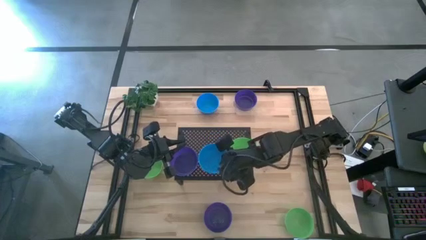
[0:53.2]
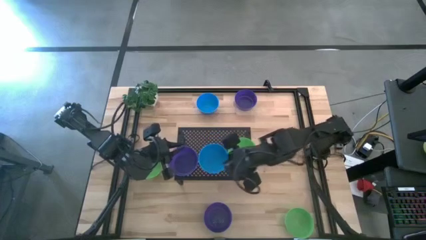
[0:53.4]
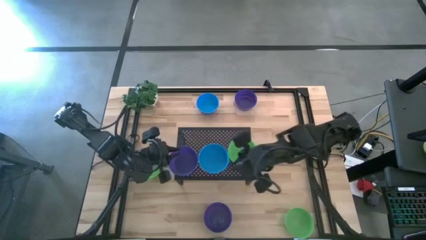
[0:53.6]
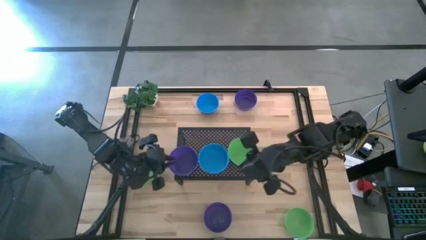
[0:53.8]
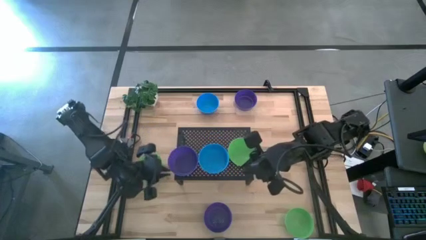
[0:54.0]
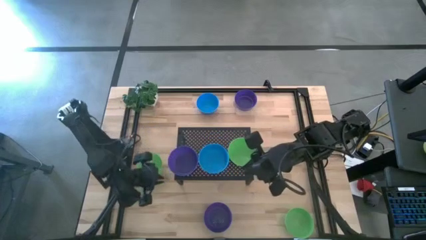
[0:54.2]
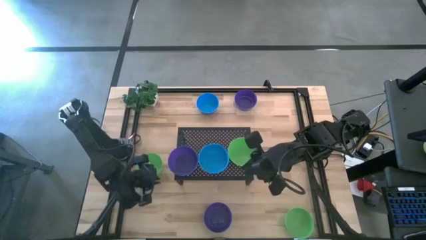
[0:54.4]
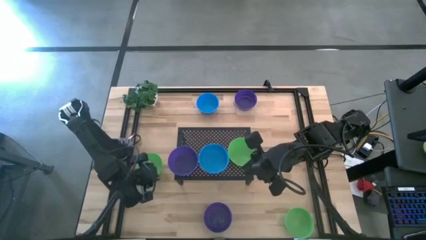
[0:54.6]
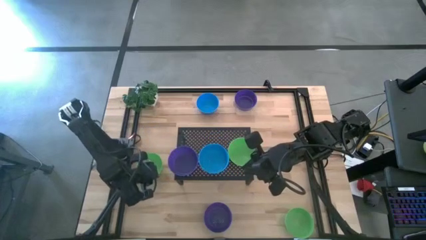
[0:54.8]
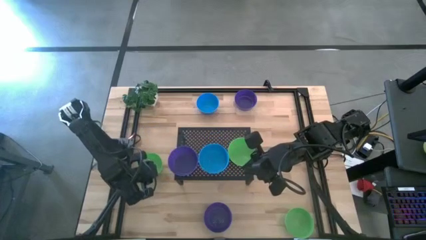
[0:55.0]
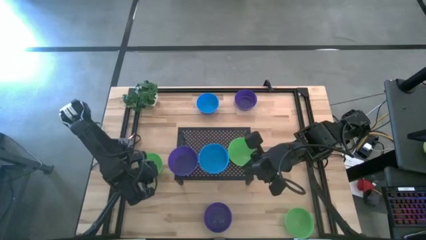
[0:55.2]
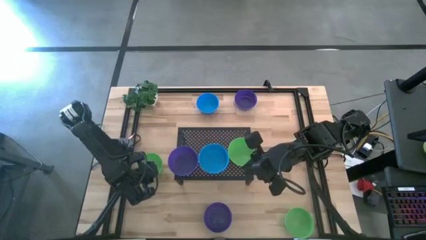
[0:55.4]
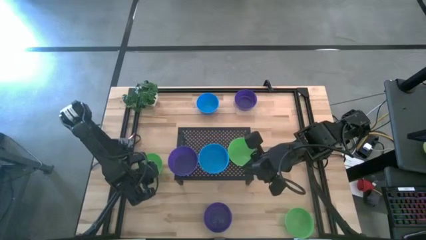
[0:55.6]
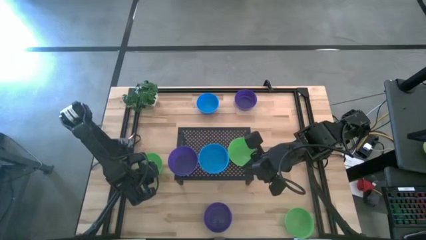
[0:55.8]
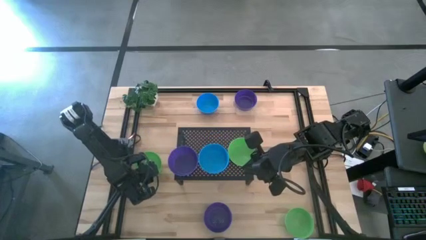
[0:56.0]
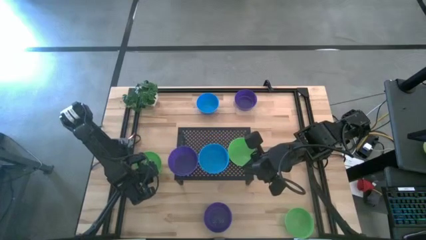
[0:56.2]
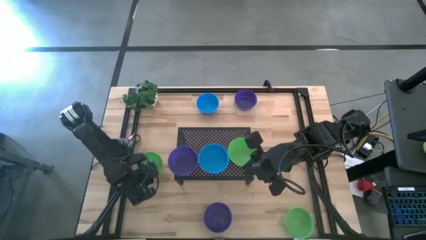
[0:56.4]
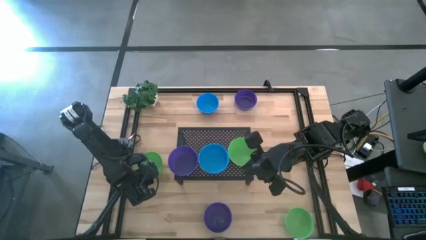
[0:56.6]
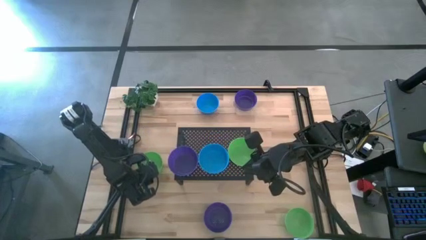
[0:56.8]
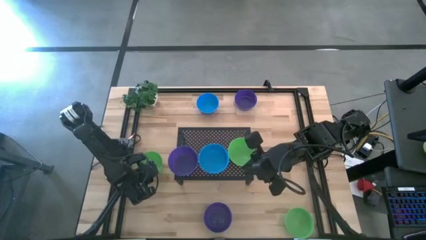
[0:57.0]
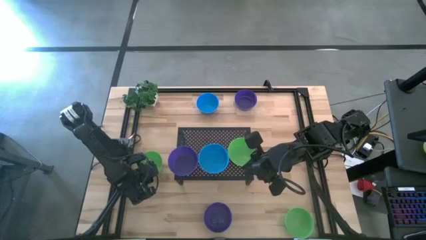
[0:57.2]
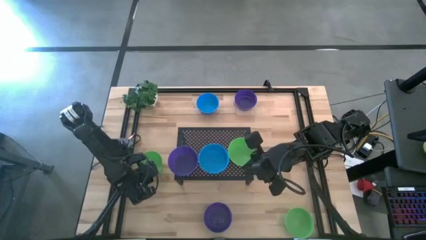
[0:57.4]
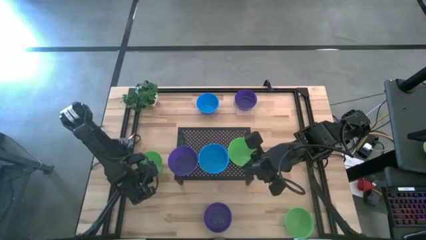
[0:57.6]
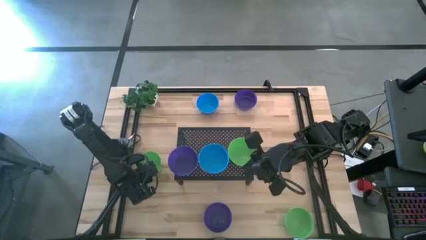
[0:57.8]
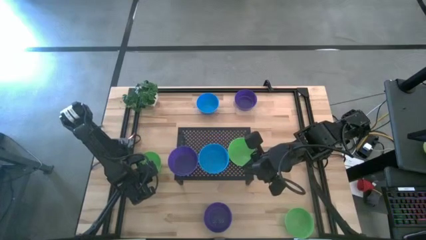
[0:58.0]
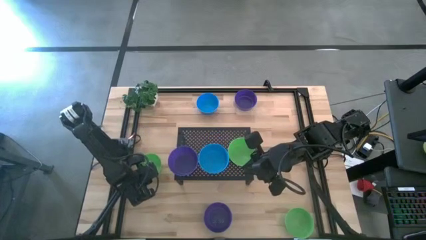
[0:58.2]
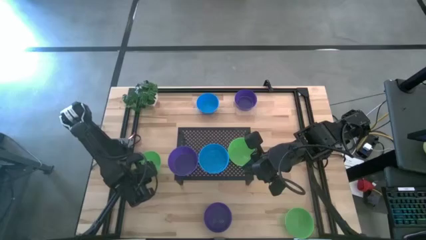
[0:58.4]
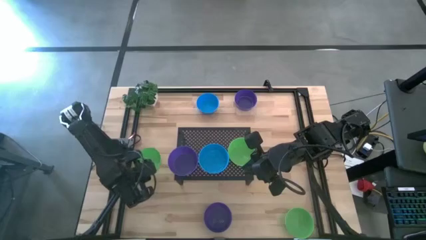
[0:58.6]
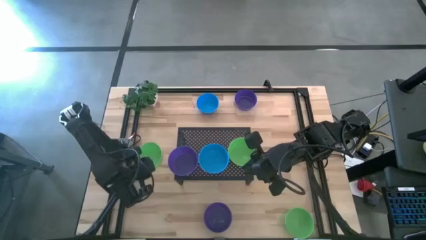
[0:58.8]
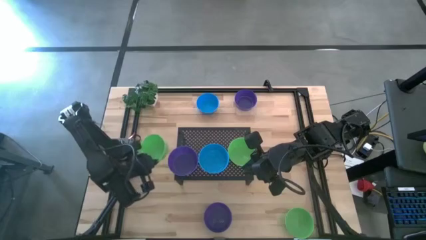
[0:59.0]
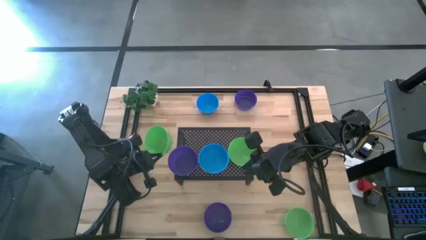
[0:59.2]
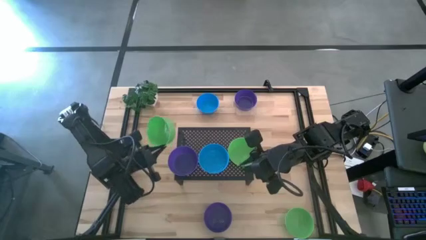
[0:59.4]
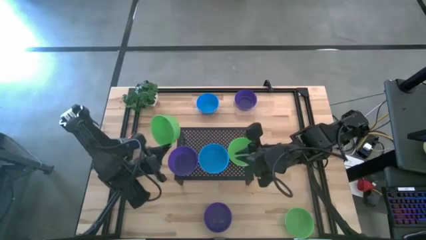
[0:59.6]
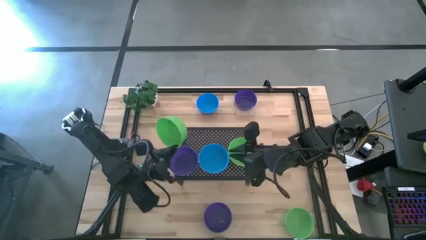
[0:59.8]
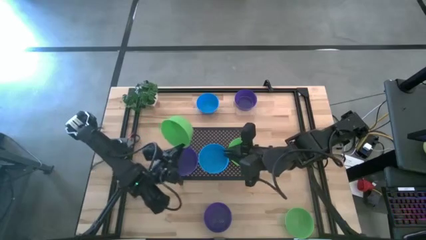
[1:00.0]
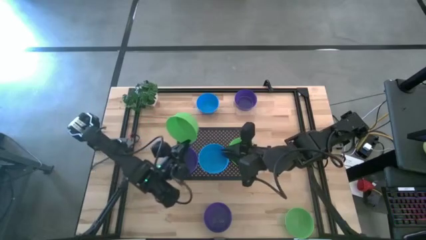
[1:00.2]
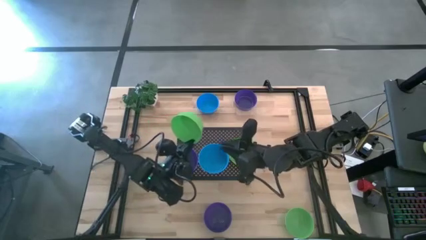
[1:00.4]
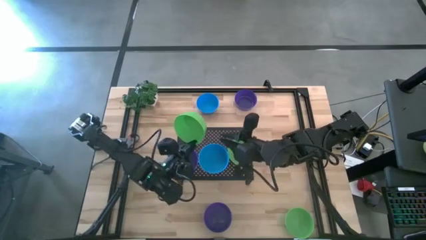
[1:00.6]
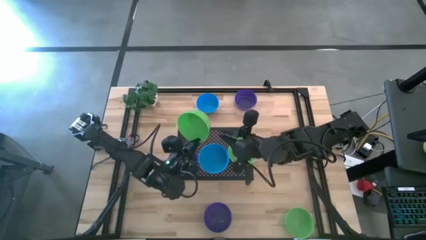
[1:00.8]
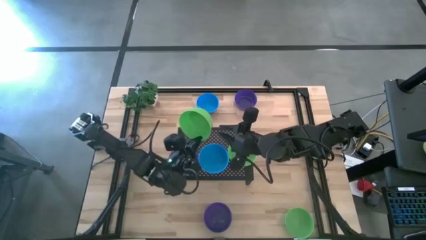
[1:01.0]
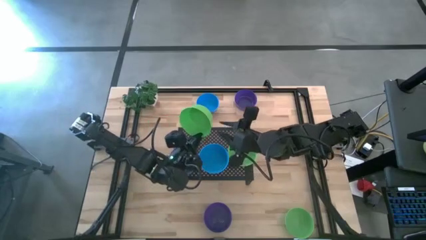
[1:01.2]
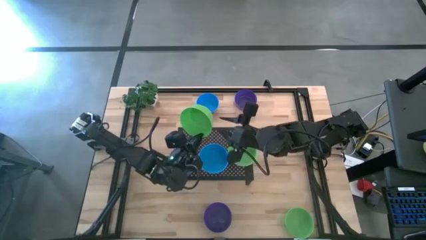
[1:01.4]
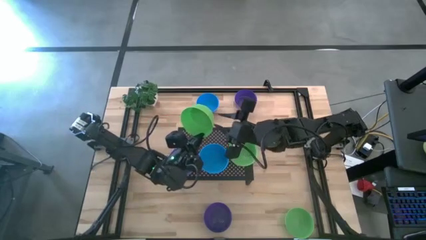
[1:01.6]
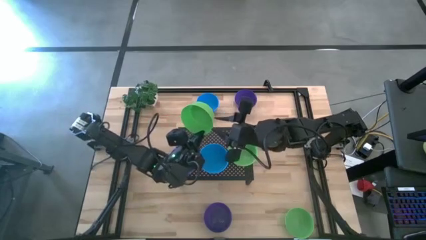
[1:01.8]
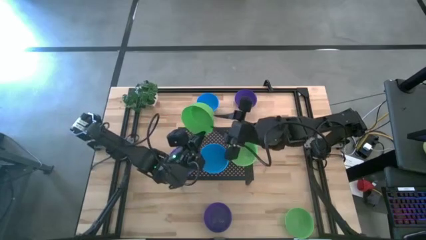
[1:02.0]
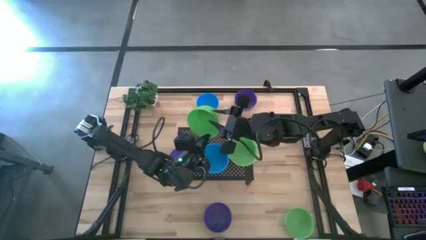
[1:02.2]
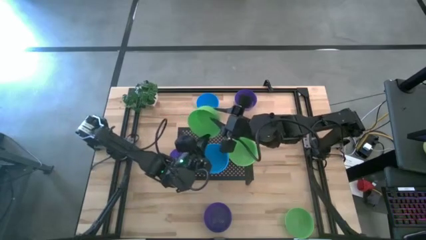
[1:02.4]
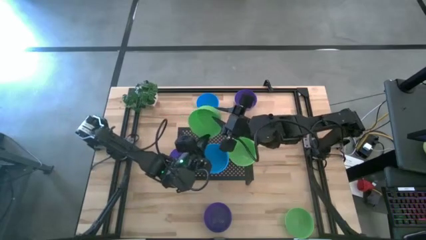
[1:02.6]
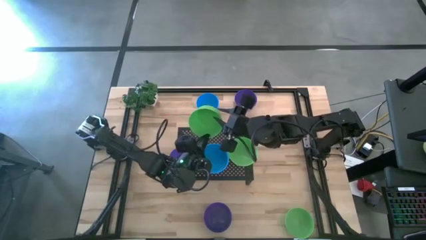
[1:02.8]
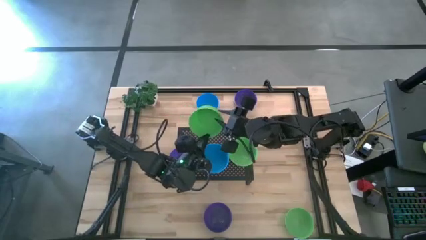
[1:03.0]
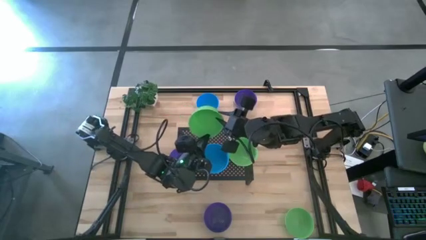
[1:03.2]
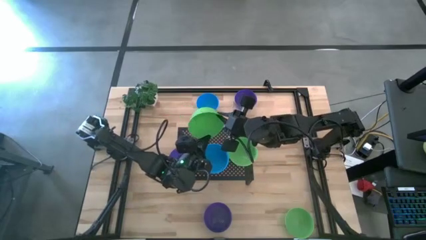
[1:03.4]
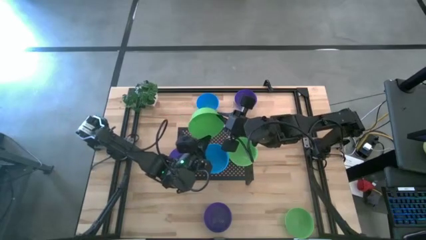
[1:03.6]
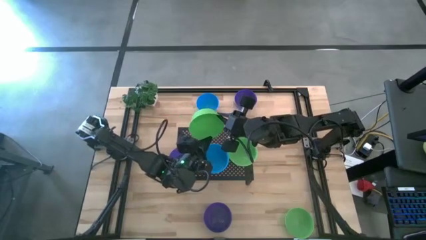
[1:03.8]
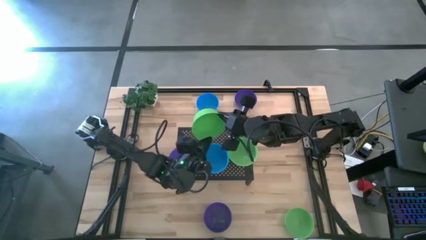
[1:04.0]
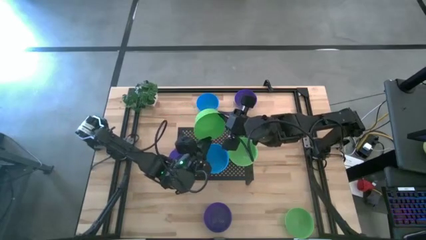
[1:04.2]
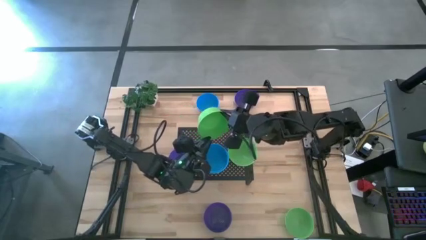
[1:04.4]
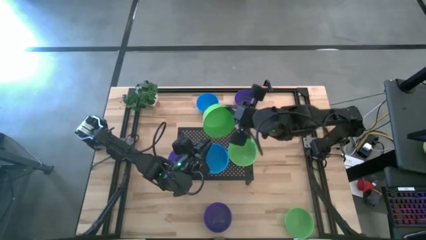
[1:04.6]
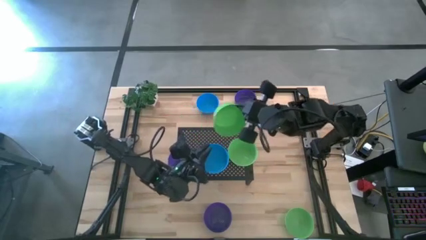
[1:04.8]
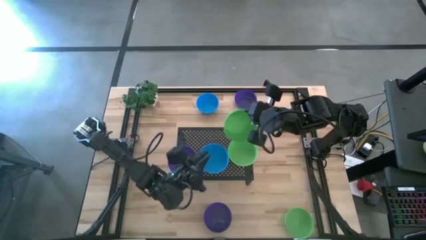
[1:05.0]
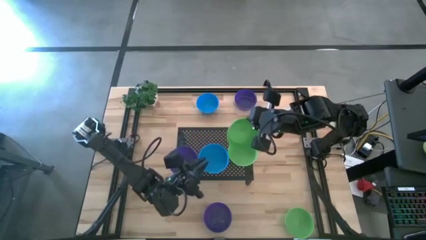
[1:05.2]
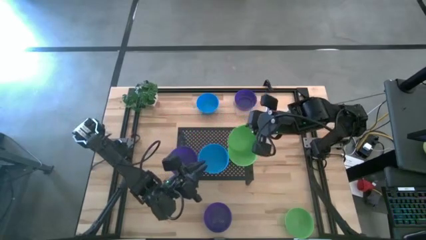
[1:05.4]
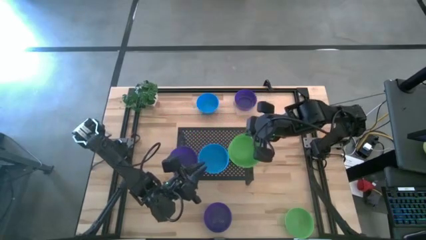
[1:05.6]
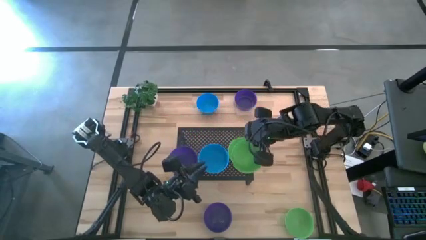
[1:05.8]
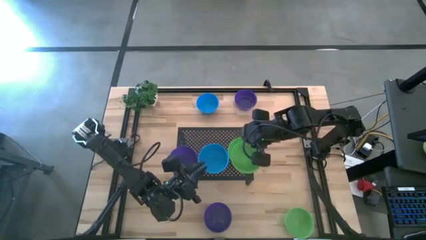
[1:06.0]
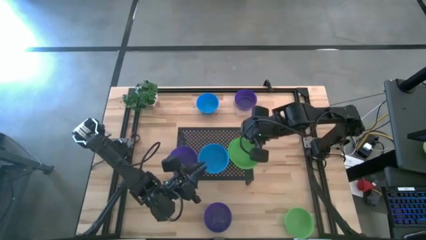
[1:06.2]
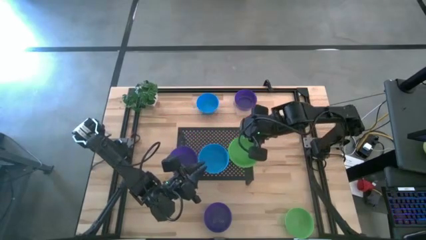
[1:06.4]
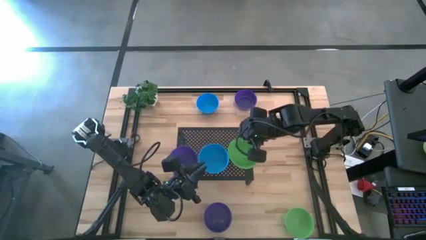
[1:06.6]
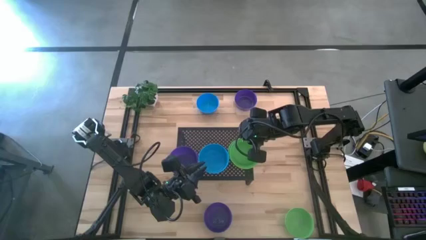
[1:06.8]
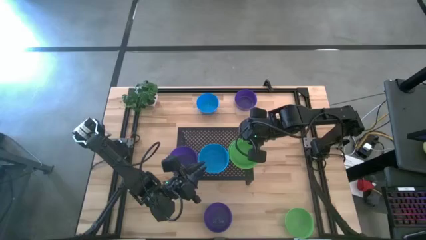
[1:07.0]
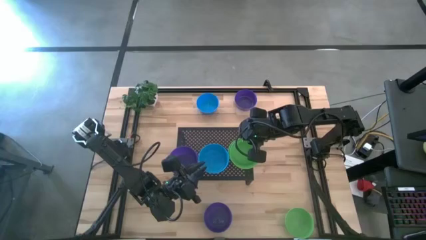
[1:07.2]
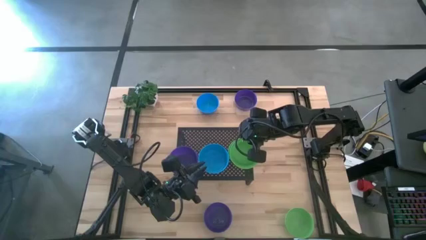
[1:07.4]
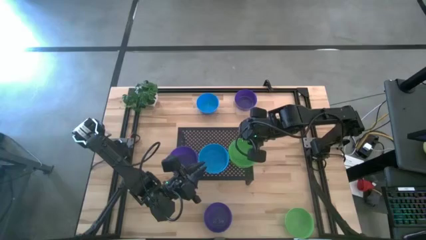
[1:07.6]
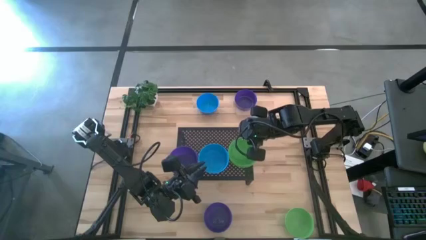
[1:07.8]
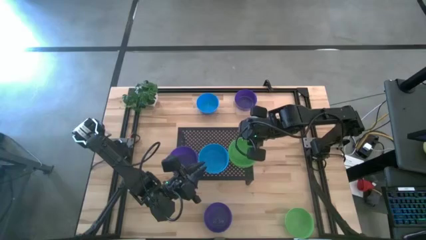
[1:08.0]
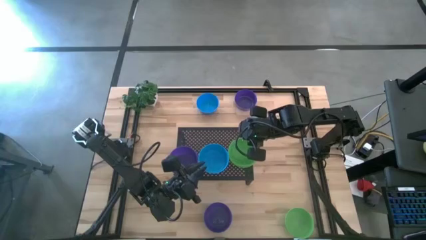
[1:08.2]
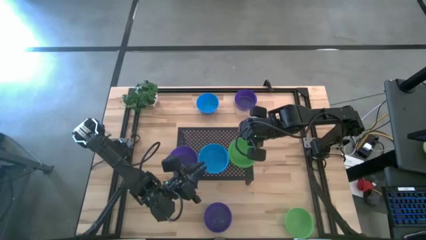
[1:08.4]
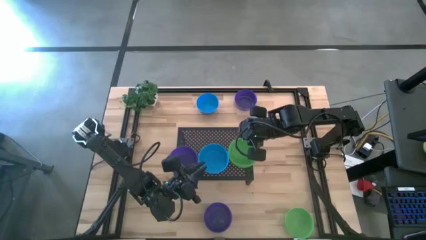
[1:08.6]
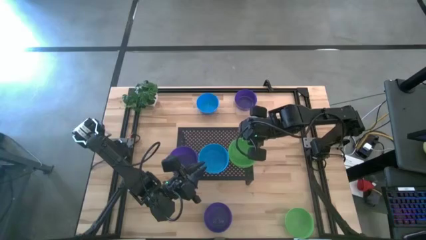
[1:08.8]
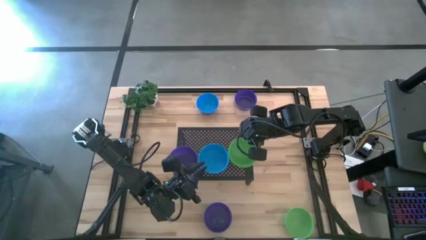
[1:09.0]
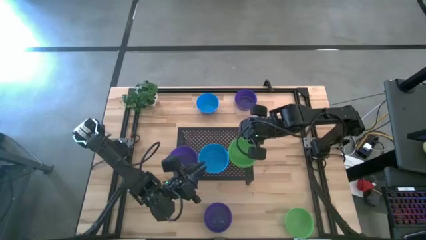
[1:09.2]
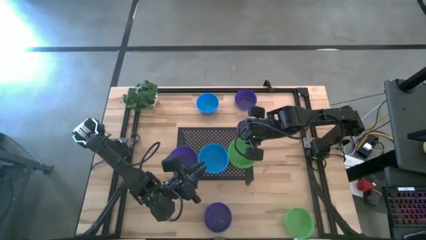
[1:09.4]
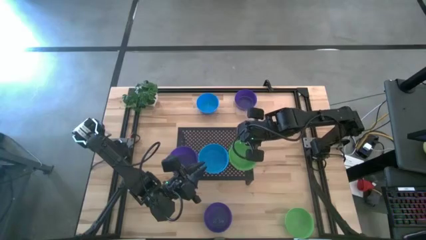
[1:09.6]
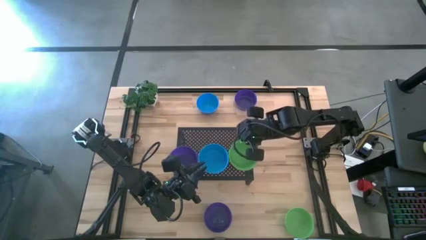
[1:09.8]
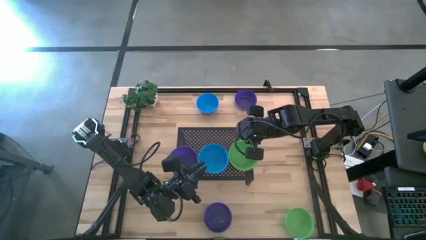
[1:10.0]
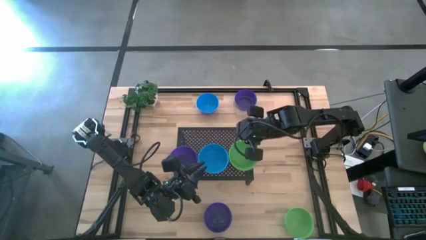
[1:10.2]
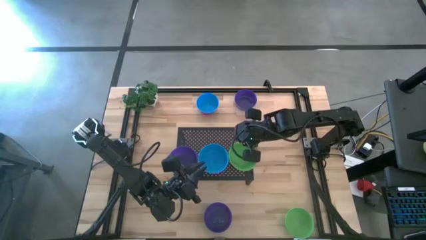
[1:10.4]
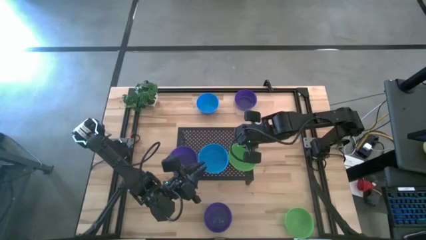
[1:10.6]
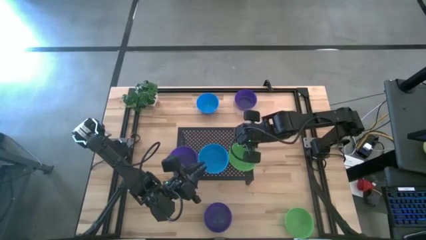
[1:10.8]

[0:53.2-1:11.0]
Task: Pick & Place Mini bowls
Stack the left green bowl on the green bowl on the shelf
